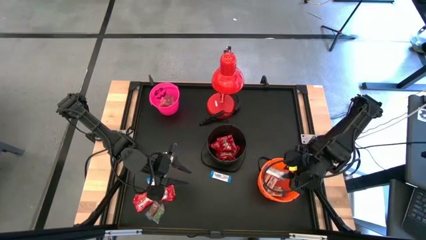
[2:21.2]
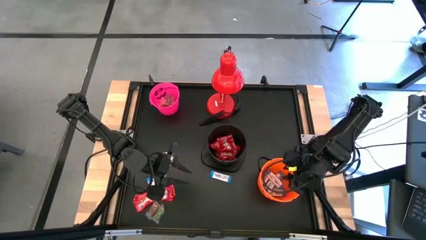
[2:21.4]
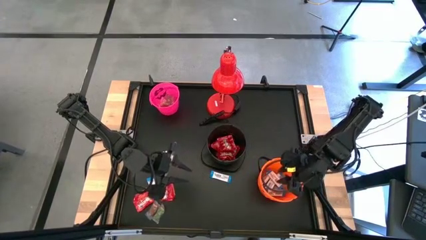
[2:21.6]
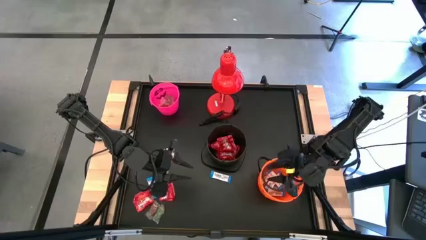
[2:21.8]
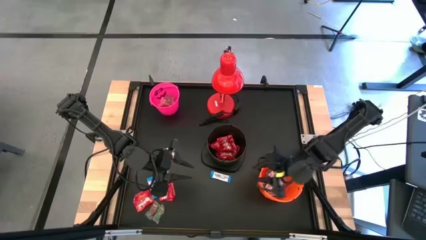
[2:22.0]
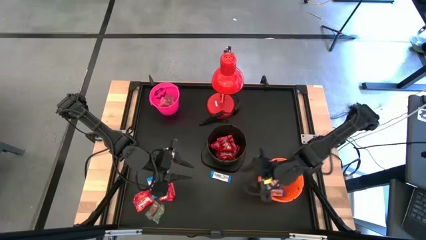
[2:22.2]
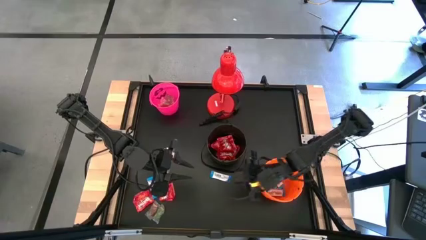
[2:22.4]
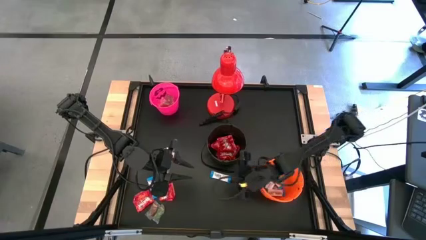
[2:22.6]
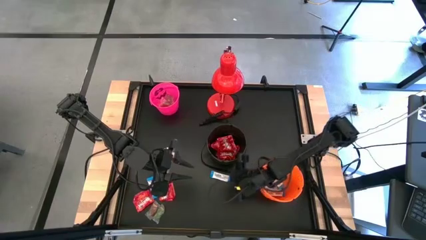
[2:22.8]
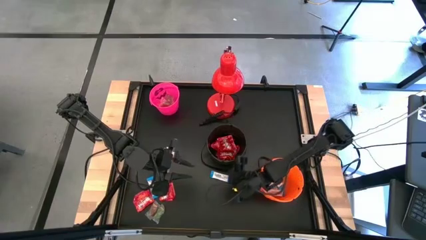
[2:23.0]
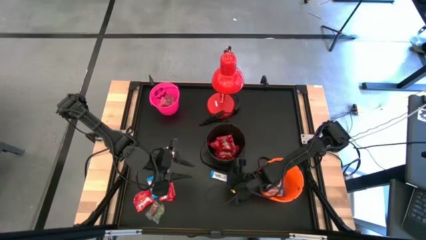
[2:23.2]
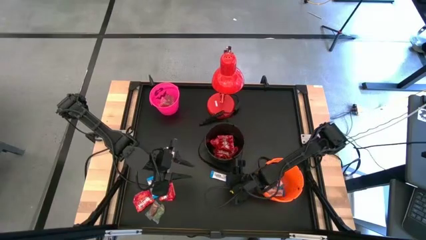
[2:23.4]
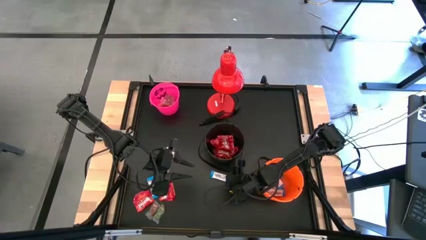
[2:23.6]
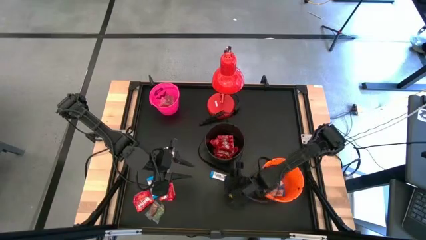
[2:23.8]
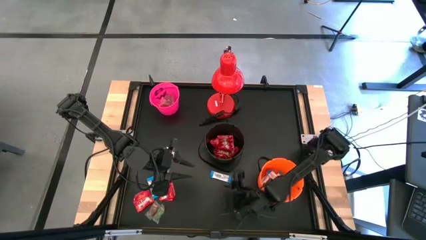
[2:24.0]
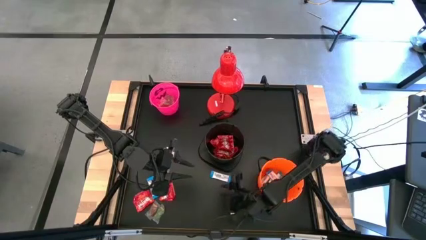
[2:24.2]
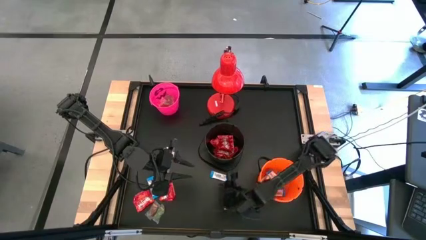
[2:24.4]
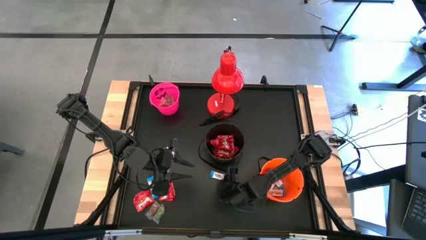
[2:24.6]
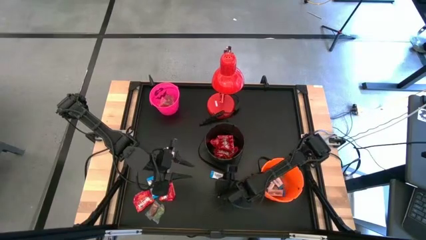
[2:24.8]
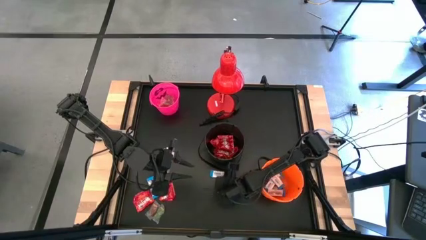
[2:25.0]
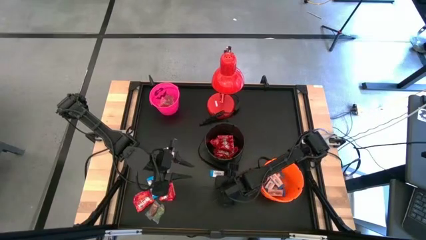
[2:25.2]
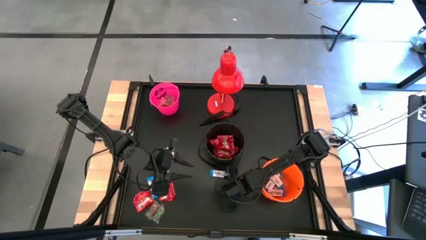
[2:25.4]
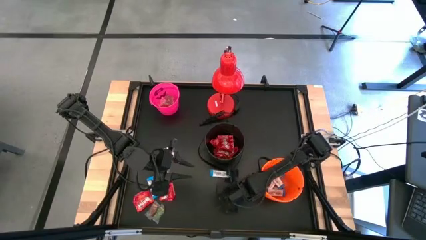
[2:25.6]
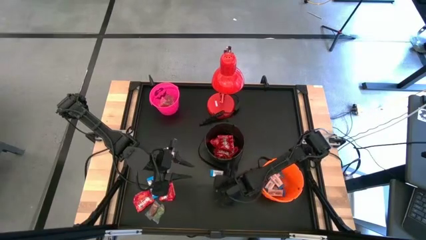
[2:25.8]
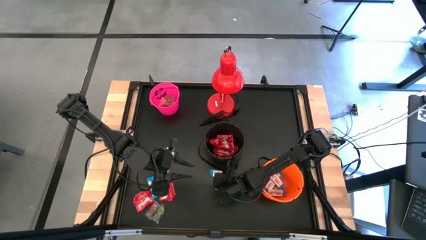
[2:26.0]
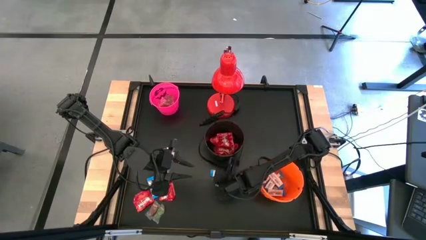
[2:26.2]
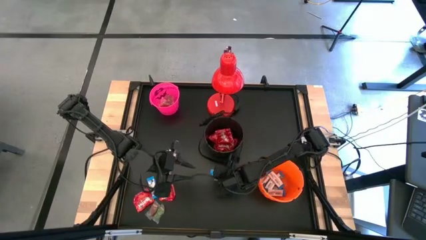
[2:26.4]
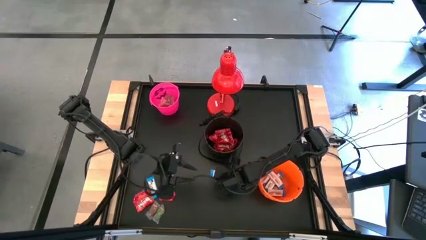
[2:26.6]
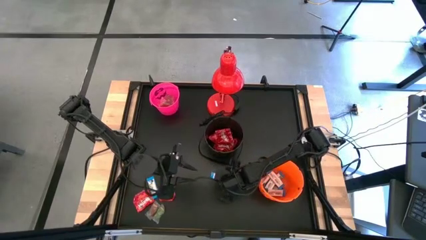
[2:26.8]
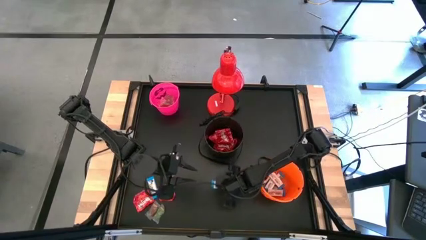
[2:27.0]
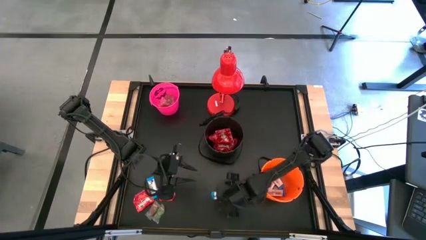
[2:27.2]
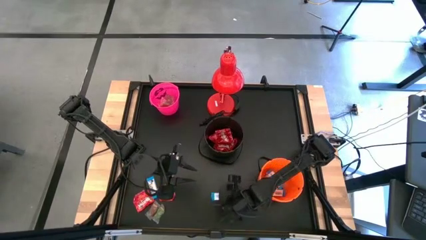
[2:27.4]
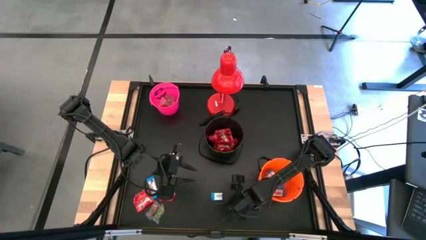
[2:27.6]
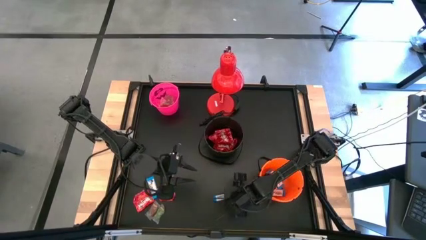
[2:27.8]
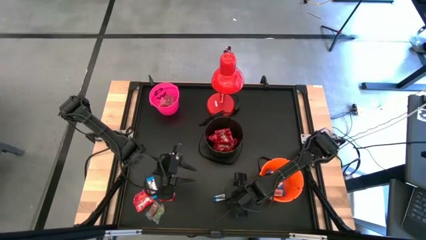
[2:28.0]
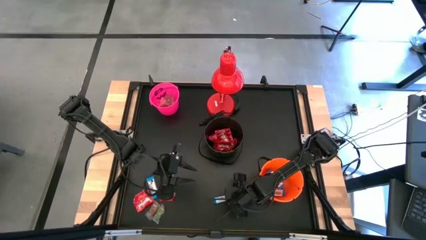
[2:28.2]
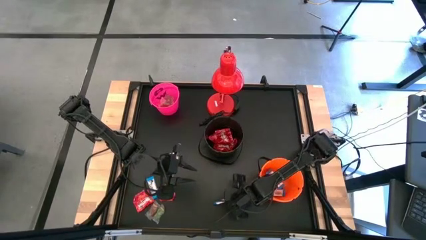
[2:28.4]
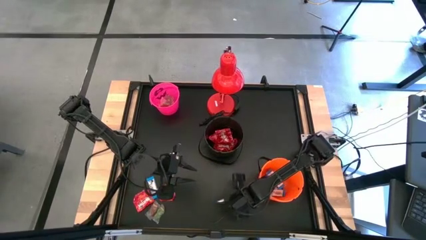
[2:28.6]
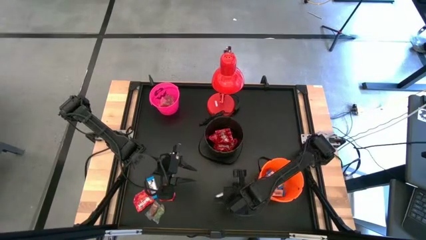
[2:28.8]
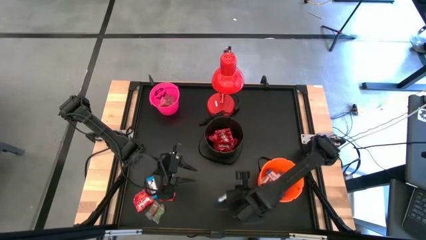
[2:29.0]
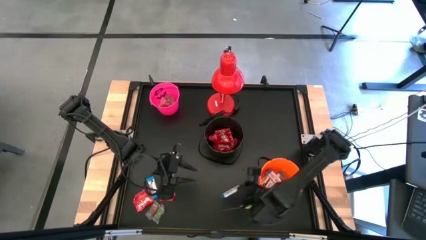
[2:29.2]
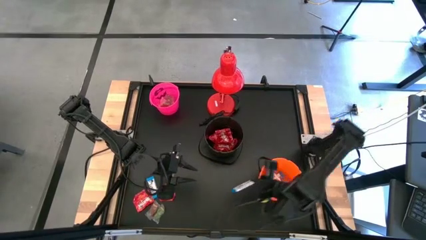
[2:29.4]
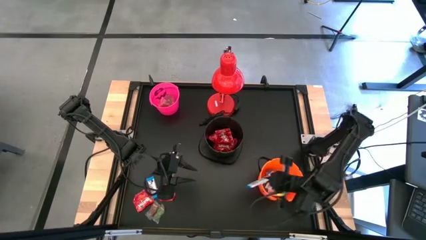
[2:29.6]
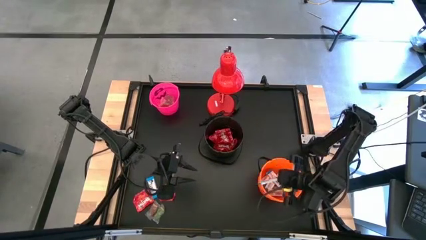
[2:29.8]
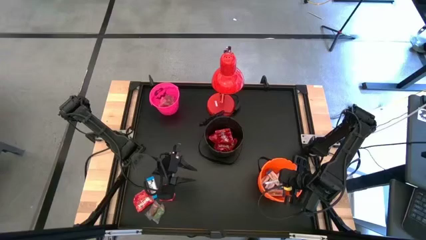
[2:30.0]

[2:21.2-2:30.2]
Task: Organize candy in baskets
Put the white chocolate into the orange bucket

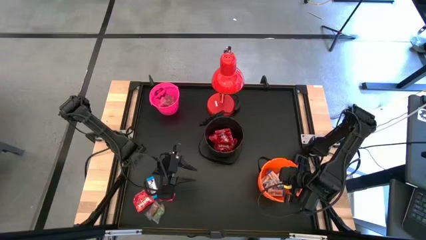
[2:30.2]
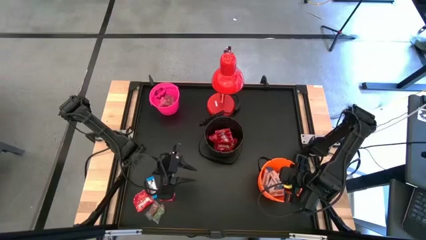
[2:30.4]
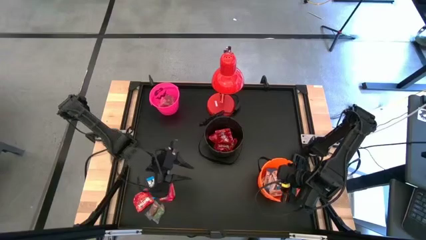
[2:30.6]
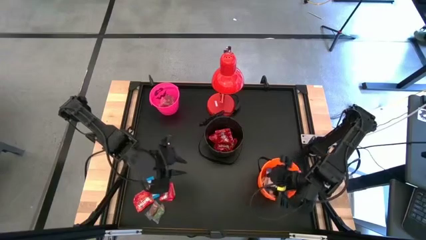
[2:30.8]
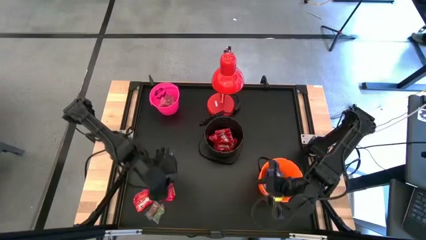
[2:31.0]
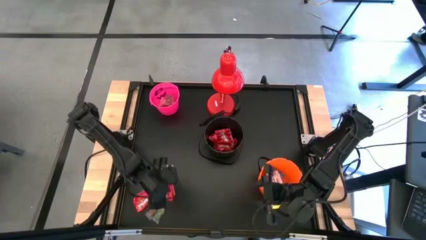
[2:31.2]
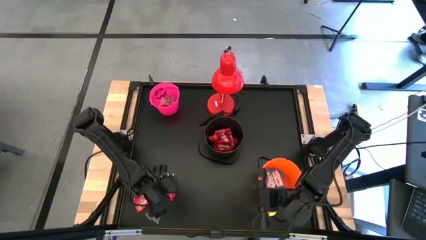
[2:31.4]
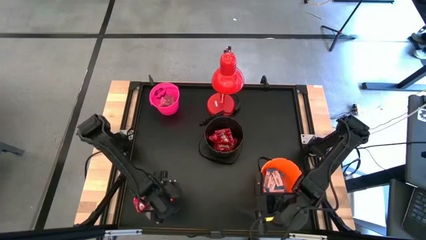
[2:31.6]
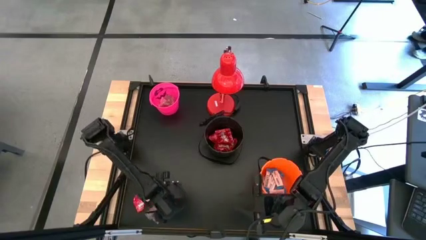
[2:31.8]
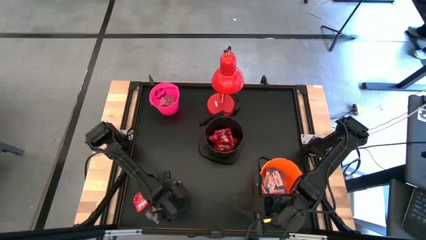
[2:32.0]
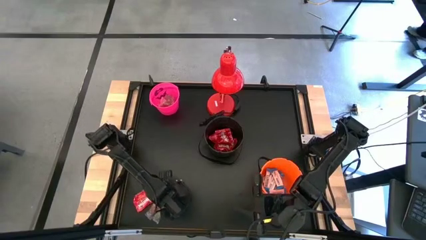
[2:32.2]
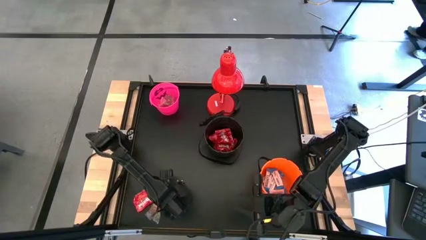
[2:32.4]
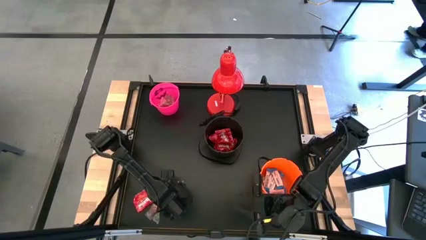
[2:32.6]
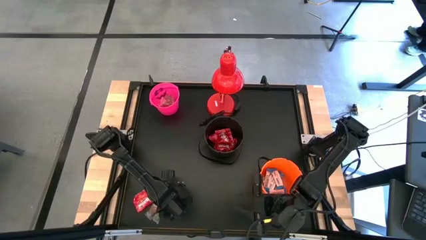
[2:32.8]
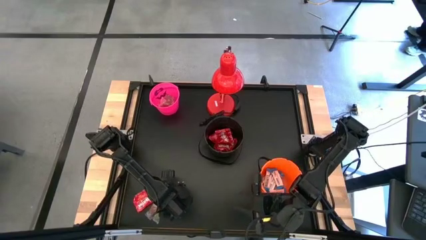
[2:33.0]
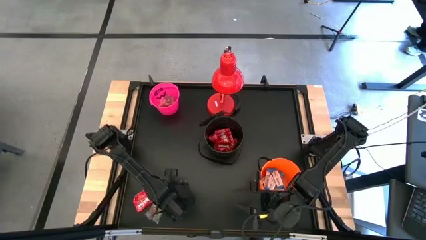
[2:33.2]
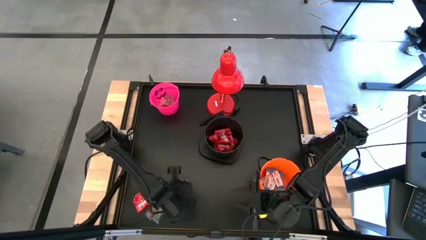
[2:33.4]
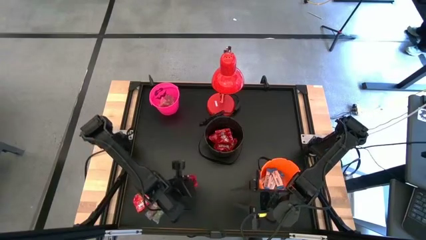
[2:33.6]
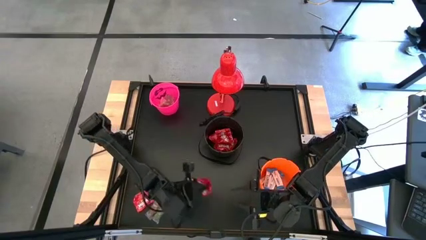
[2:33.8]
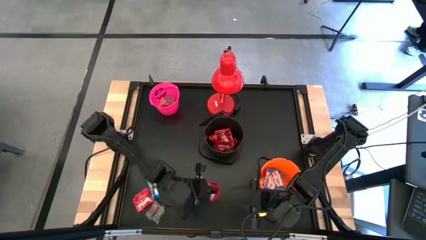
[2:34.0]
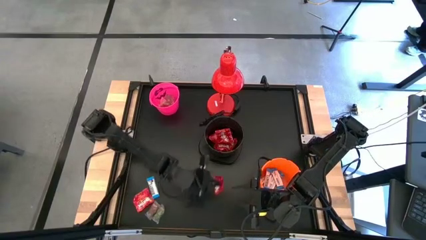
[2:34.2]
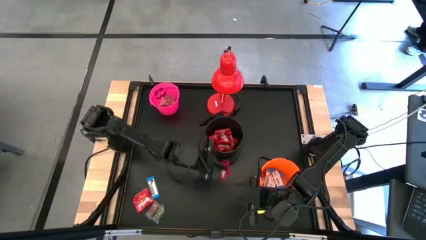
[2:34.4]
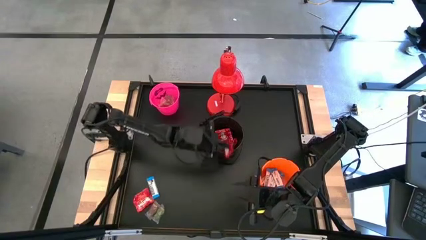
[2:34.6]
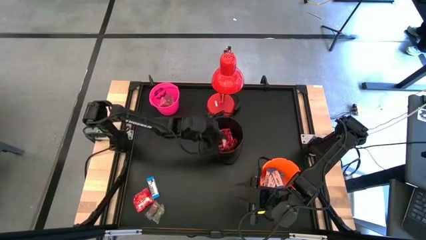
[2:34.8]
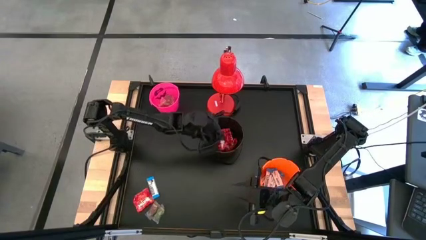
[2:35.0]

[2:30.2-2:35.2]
Put the red candy into the black bucket

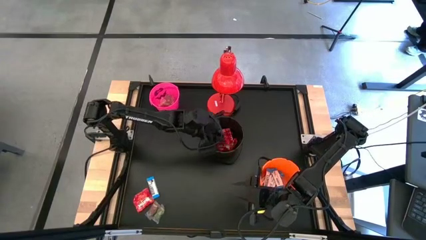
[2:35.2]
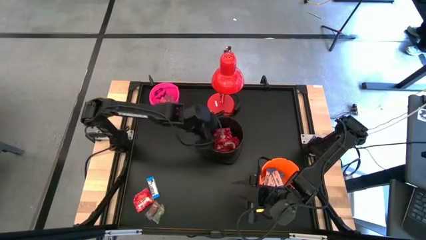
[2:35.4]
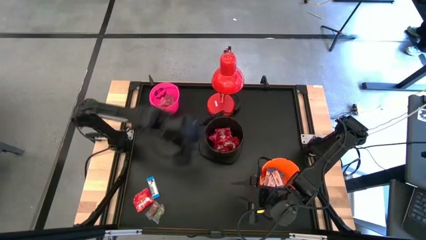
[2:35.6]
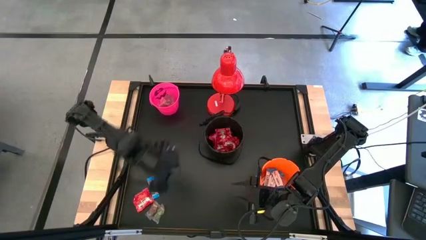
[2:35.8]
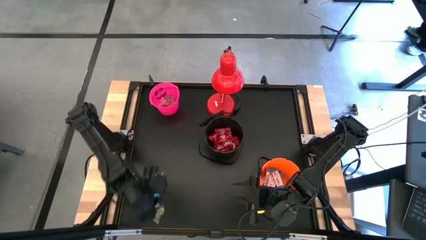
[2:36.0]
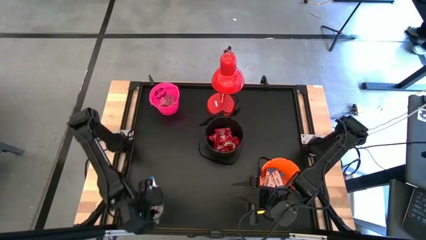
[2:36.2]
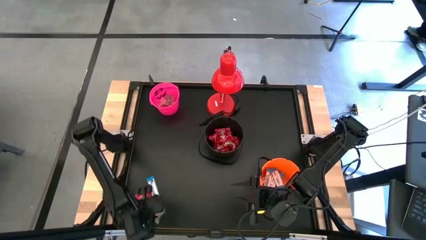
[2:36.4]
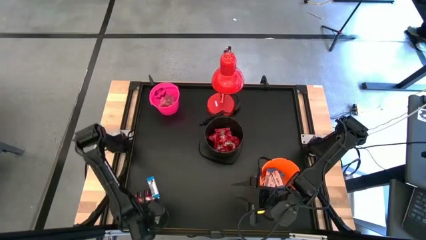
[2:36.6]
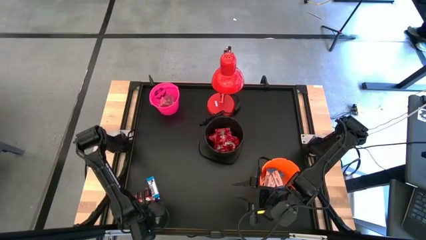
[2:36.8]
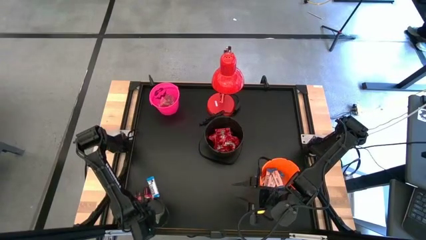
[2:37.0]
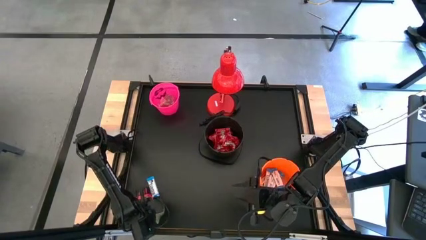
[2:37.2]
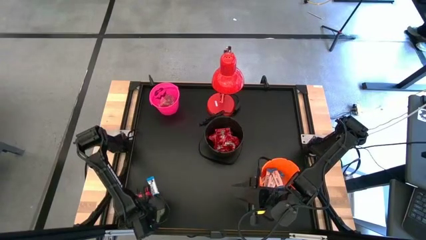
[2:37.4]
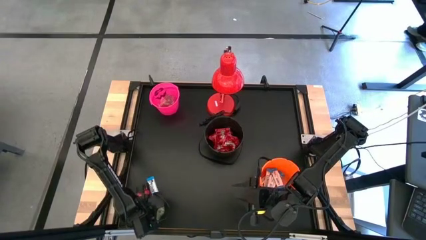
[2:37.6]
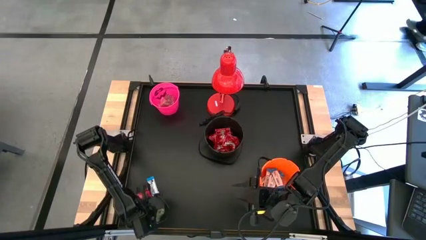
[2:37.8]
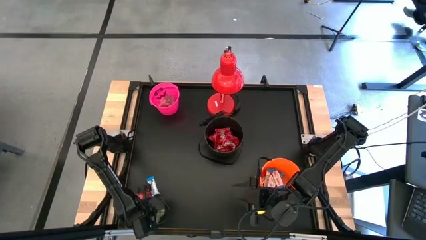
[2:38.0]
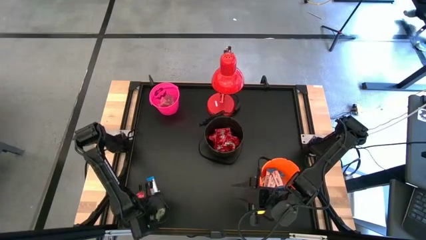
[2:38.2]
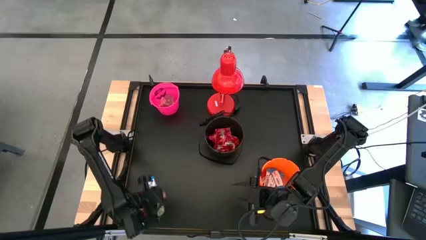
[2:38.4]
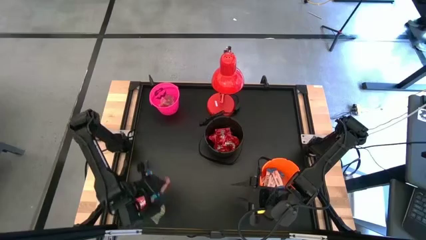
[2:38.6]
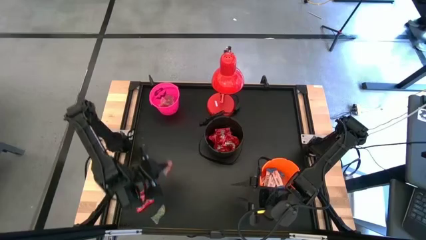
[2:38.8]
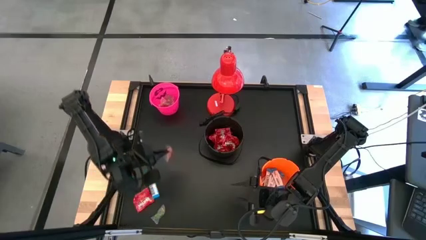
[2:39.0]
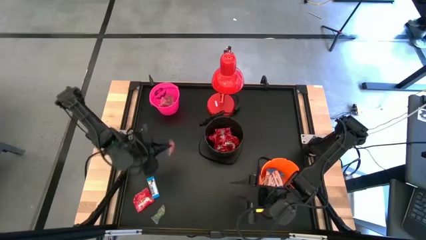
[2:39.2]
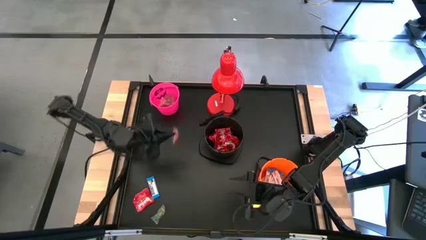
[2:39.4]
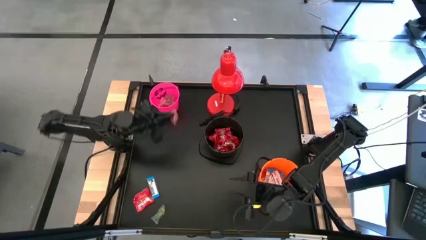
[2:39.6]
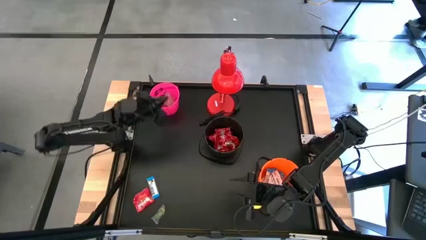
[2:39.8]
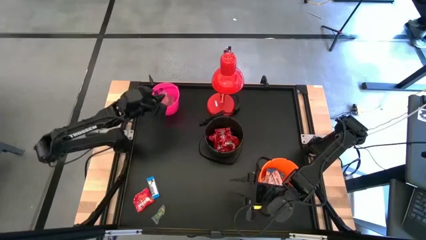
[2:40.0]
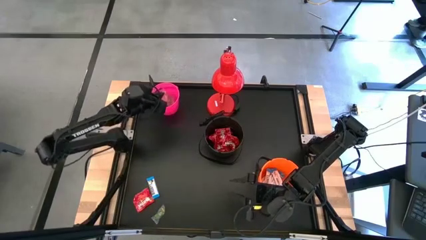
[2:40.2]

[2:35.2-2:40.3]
Put the orange gummy into the pink bucket
